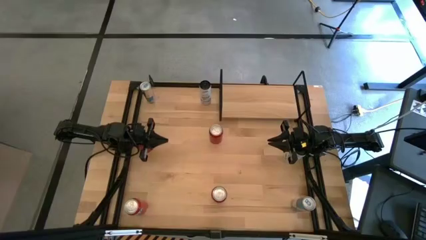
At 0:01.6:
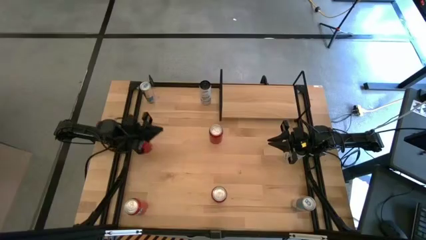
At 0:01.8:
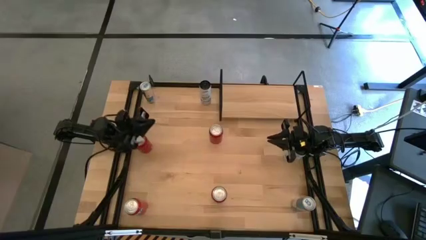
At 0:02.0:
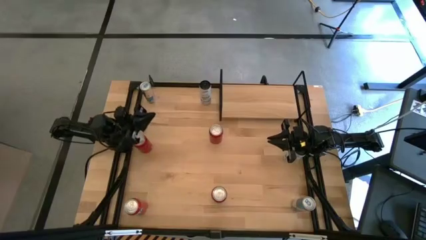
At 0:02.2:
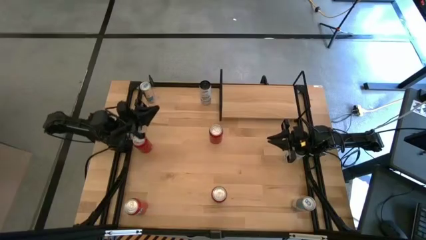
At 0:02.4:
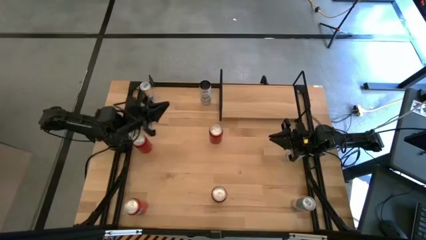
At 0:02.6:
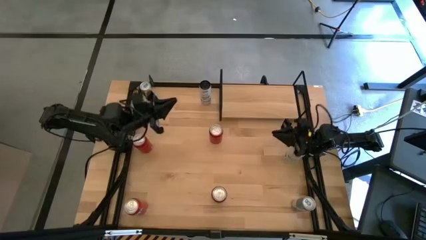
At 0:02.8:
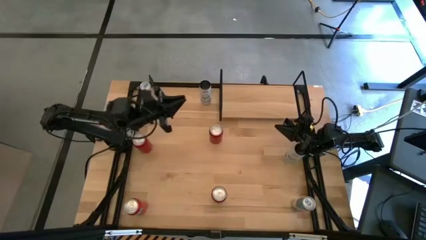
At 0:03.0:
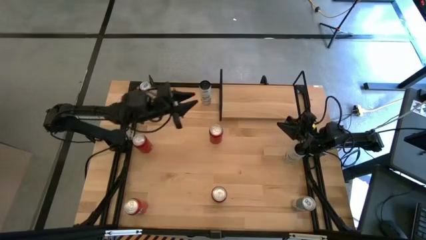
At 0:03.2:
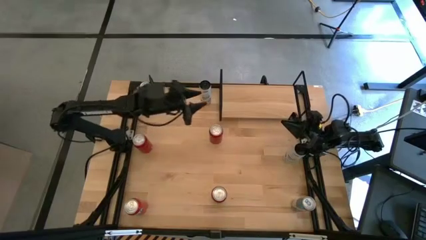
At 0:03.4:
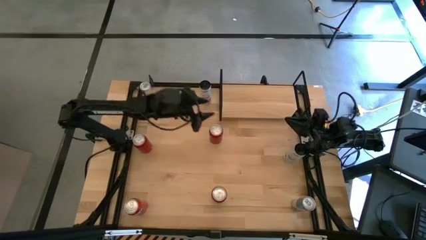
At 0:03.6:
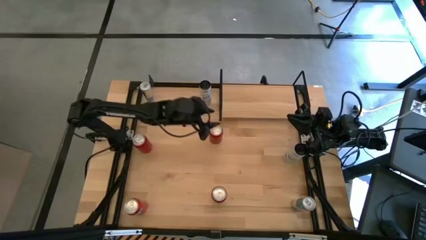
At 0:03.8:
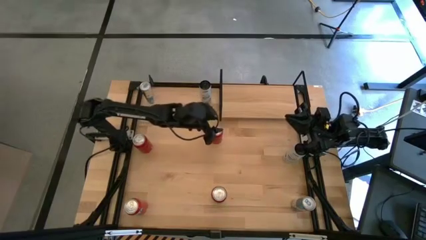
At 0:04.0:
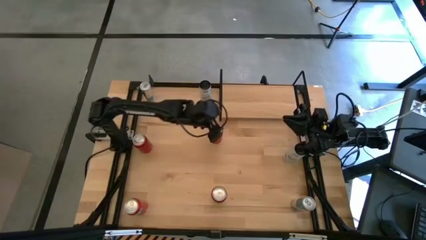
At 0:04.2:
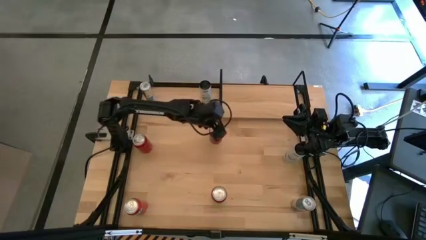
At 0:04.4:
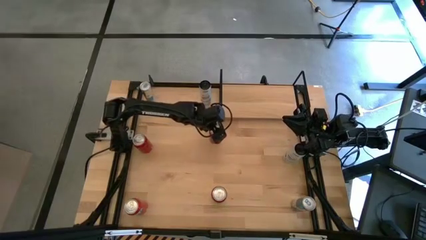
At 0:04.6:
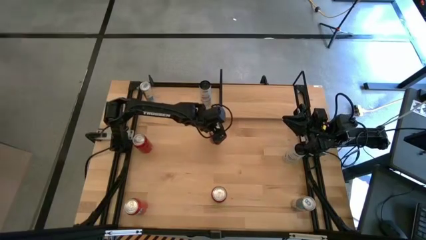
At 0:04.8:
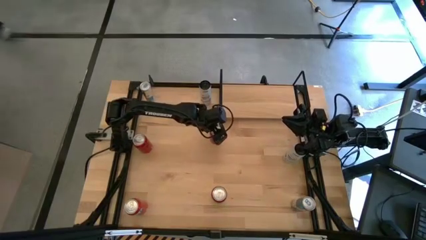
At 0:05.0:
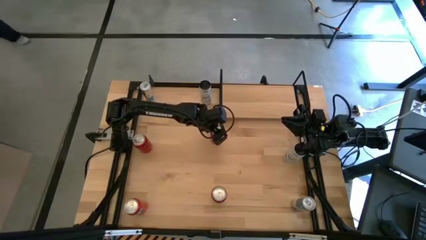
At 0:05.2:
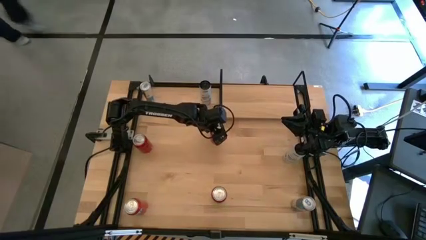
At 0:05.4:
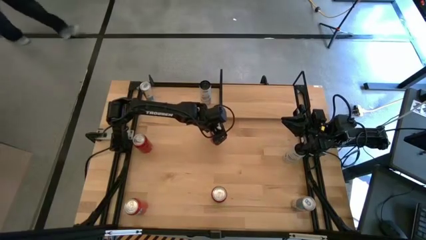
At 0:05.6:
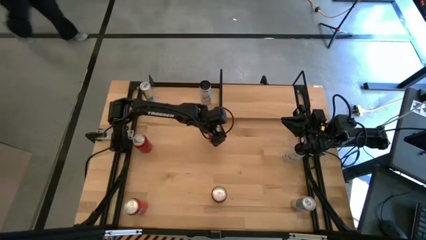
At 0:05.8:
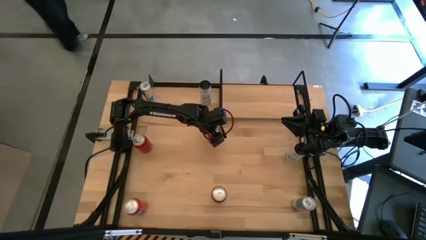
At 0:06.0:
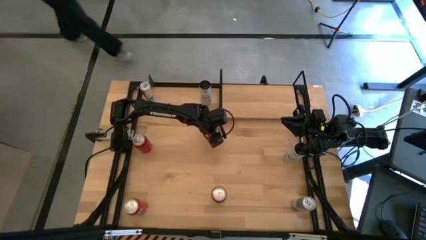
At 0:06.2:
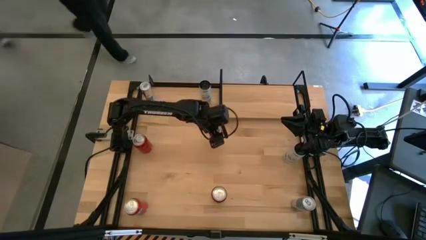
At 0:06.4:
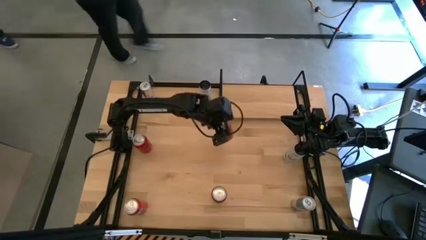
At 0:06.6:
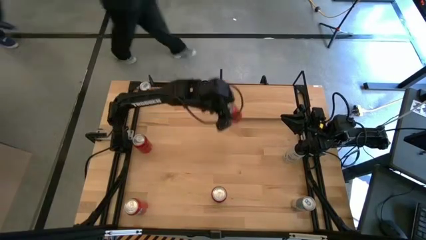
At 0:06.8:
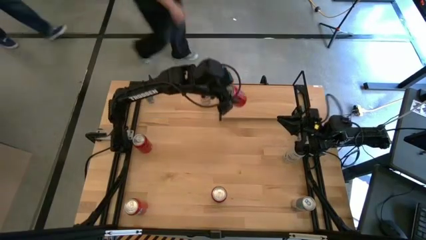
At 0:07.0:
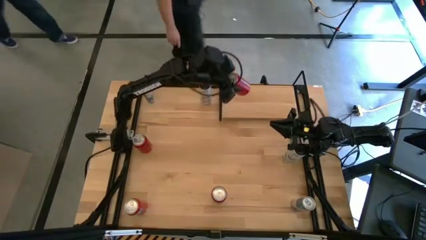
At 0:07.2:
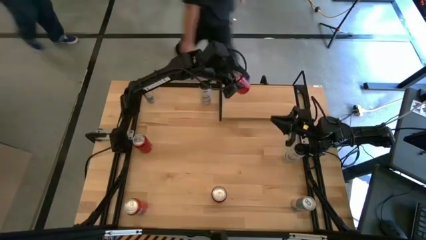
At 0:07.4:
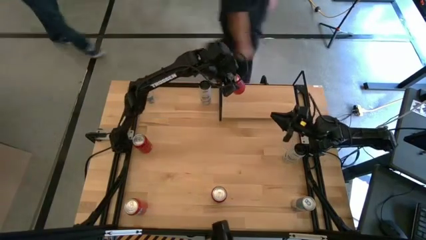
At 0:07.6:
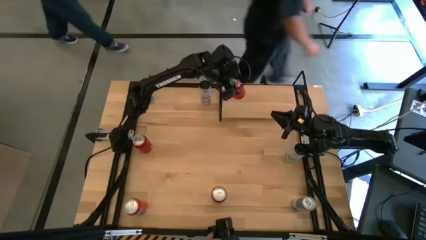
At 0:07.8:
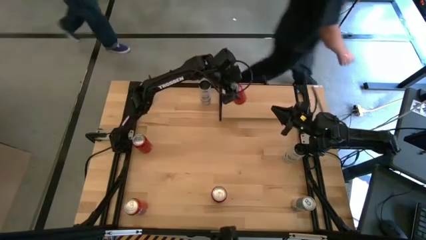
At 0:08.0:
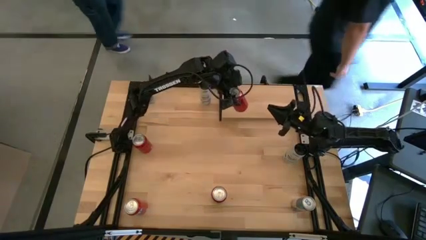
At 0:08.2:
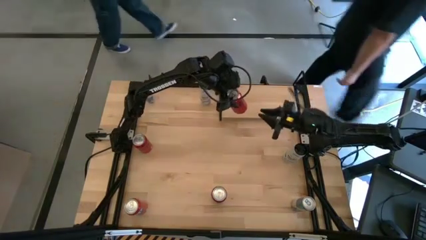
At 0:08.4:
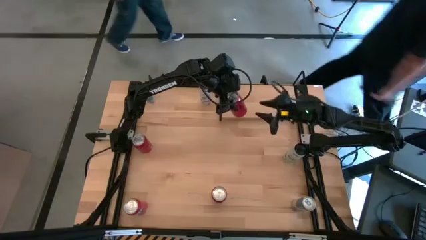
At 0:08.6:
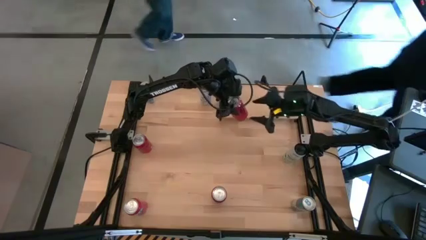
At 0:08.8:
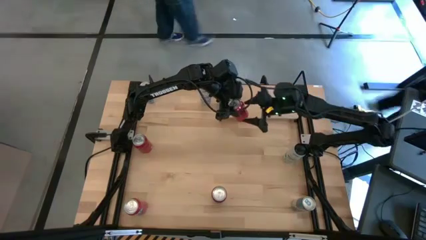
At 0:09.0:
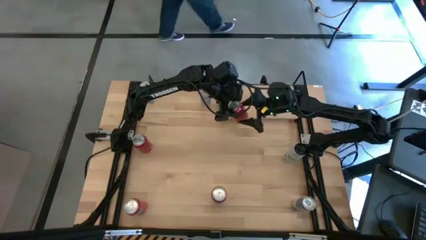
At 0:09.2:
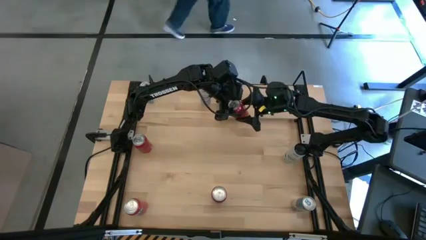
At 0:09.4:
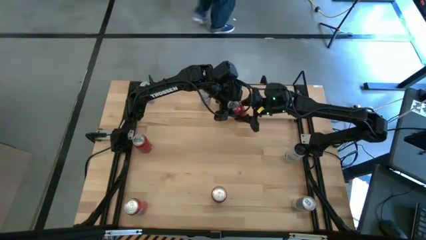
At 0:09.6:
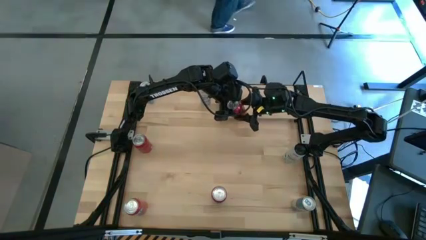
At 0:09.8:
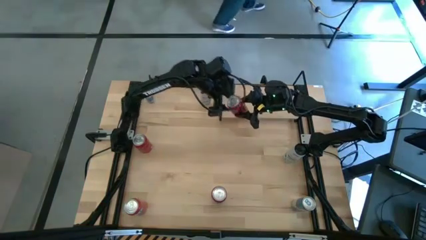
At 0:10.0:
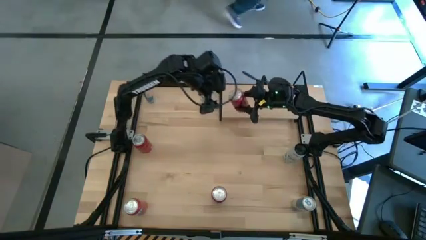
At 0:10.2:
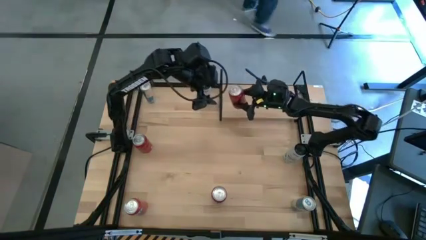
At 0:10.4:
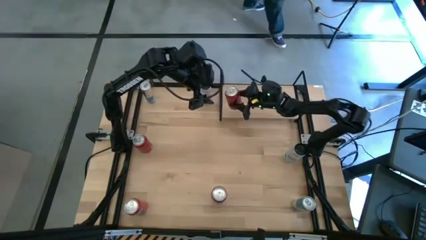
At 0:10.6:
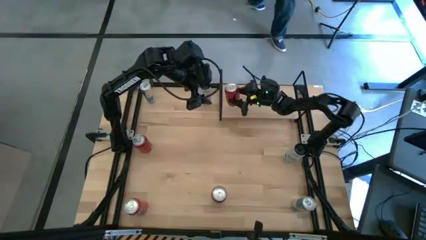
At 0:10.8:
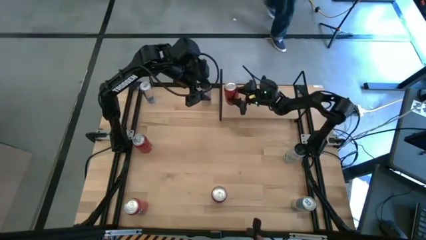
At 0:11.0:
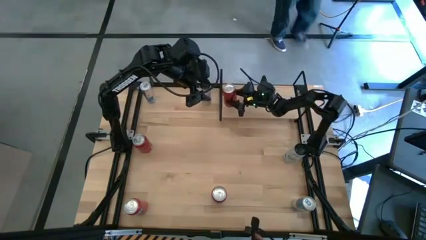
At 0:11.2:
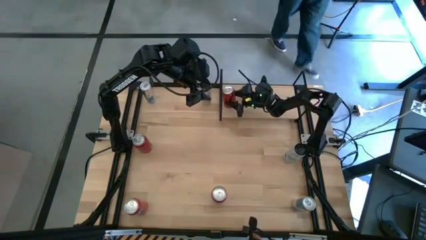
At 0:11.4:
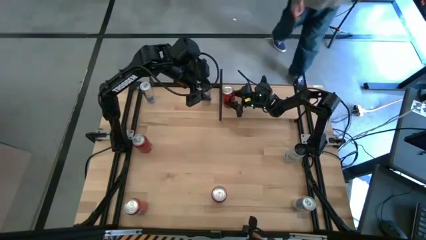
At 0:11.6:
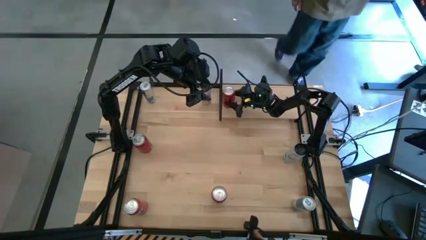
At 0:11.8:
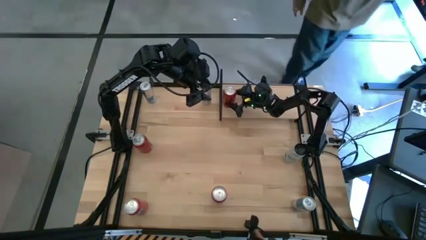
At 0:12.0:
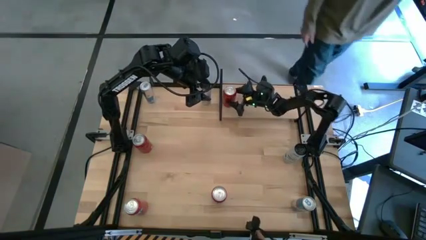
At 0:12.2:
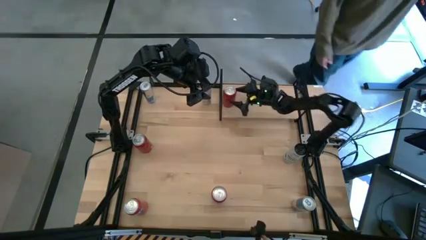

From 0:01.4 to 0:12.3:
Task: Place canned beverage on shelf
Put the right red-black soda can on the shelf
